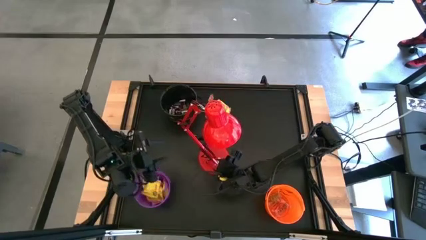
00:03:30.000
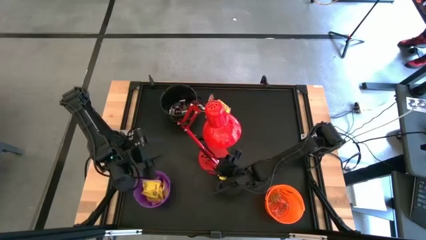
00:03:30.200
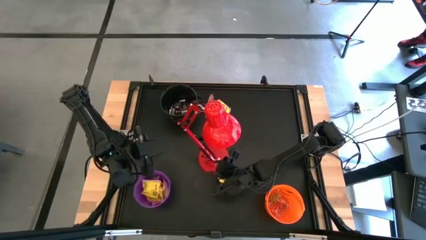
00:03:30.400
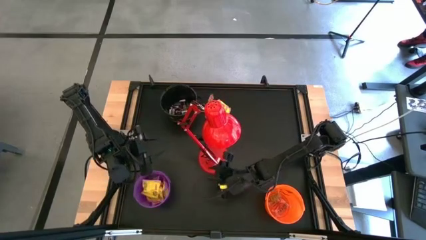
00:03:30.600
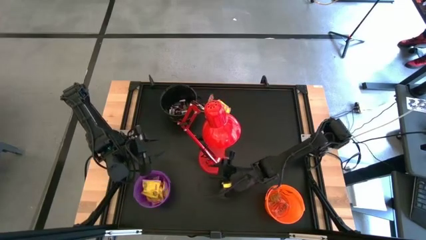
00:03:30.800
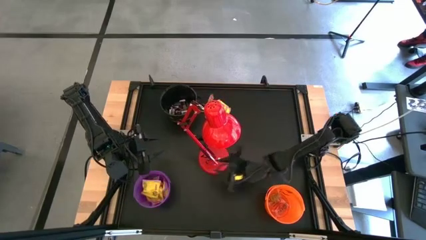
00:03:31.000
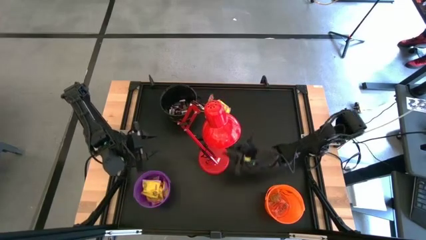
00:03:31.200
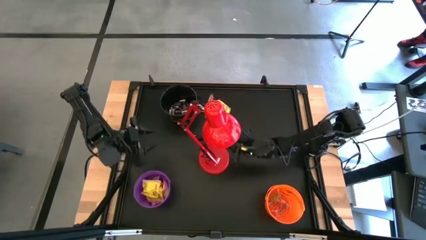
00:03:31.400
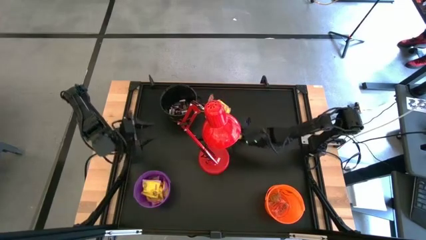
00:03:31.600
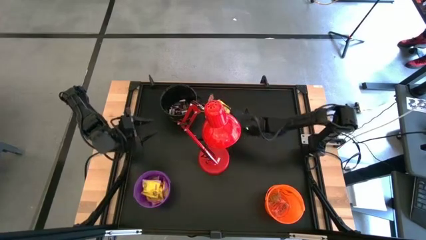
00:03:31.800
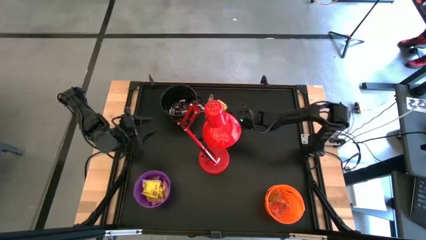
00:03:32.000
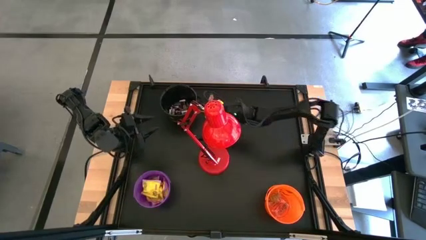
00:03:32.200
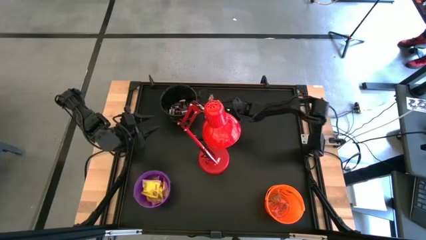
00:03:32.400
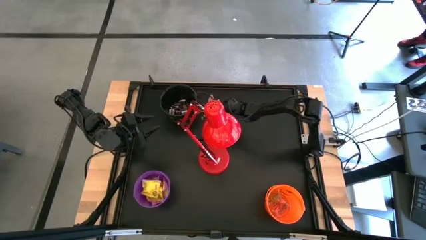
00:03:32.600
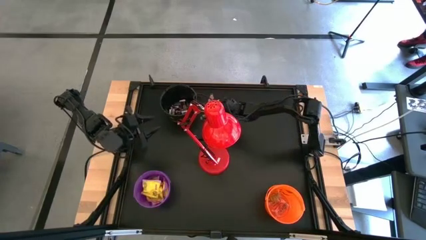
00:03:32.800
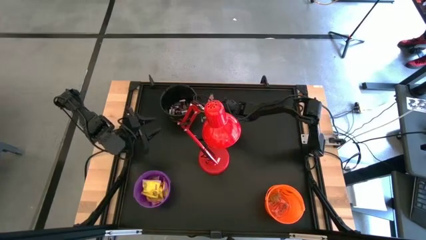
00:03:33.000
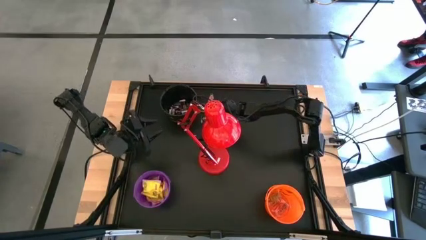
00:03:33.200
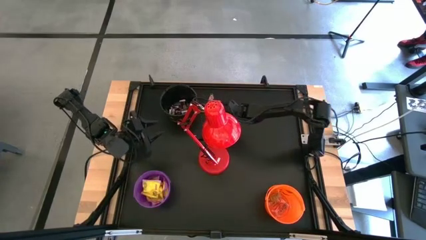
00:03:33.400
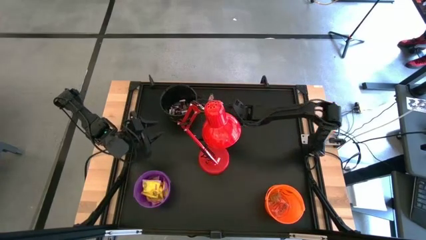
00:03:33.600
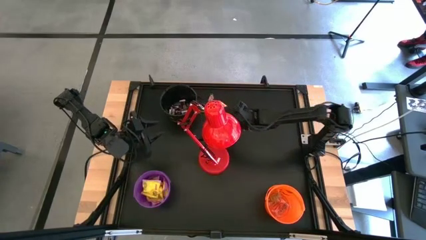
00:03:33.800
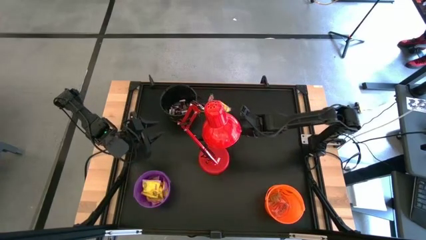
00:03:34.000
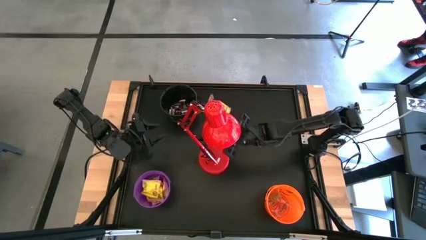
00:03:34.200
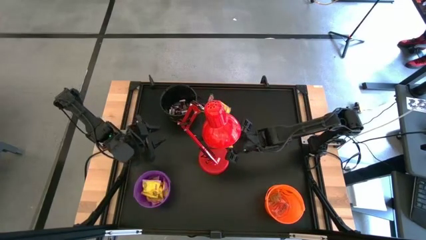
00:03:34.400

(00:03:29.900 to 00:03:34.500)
Task: Organize candy in baskets
Put the brown chocolate bar into the black bucket

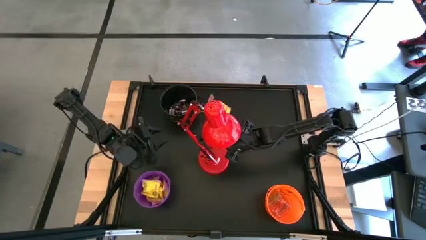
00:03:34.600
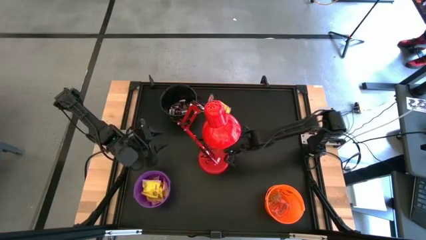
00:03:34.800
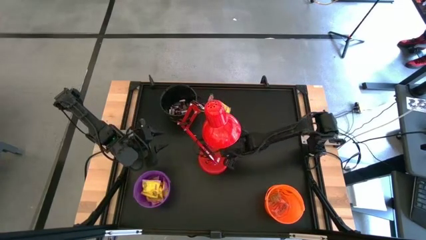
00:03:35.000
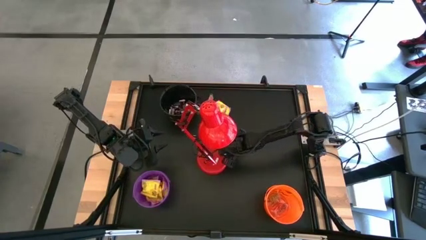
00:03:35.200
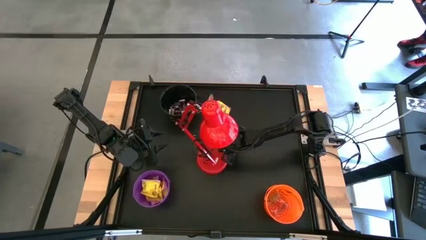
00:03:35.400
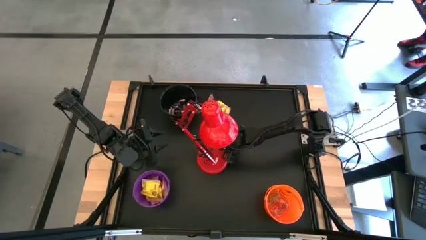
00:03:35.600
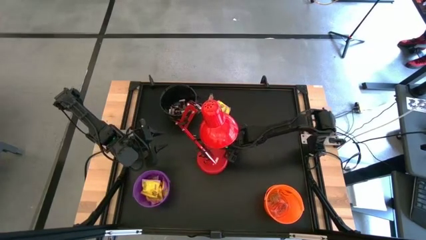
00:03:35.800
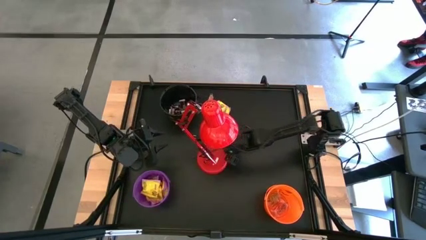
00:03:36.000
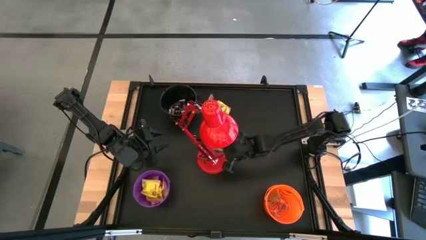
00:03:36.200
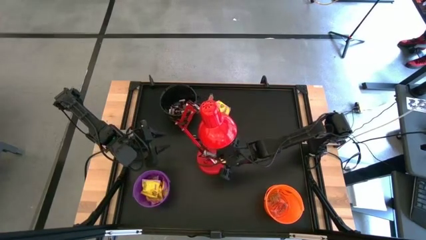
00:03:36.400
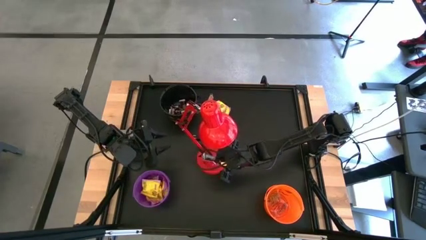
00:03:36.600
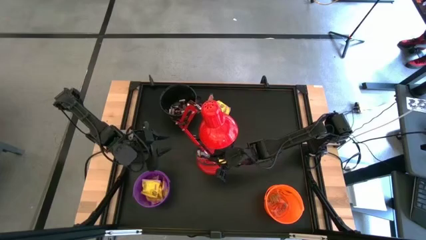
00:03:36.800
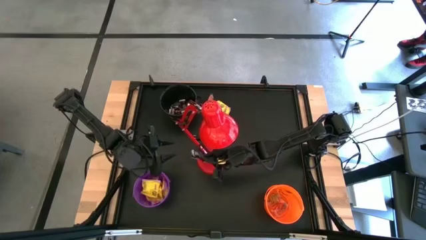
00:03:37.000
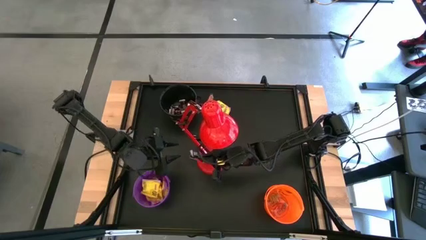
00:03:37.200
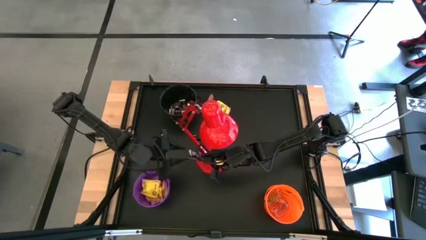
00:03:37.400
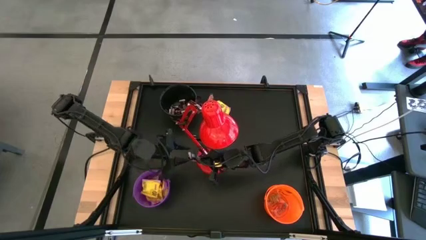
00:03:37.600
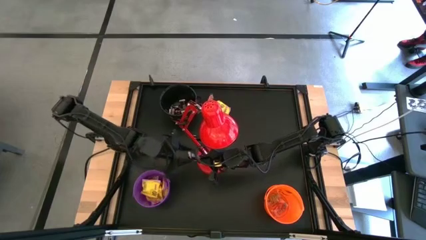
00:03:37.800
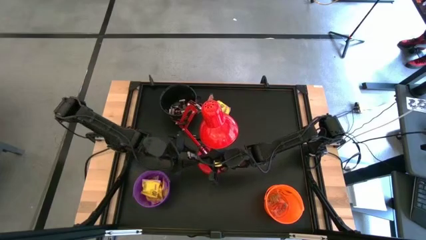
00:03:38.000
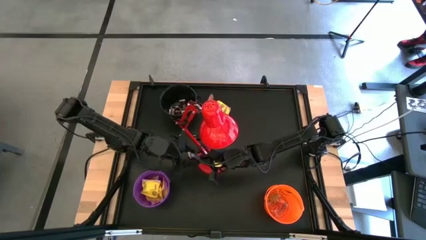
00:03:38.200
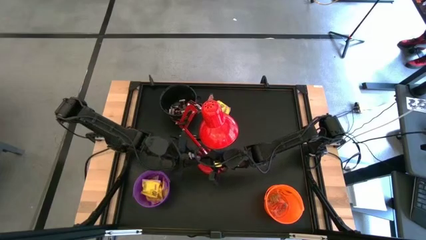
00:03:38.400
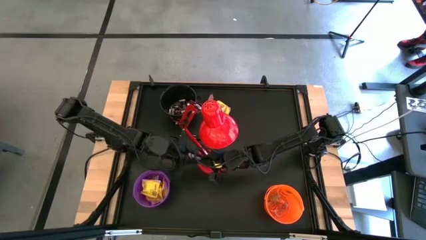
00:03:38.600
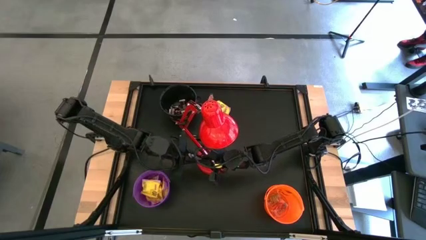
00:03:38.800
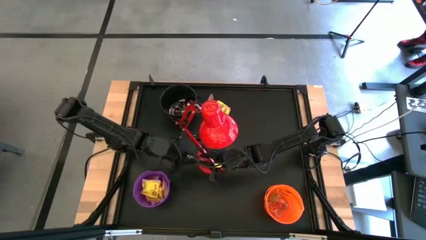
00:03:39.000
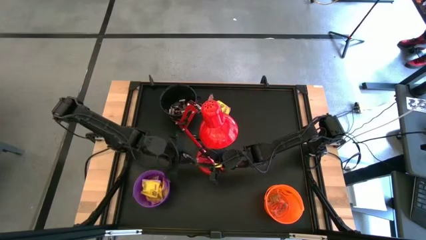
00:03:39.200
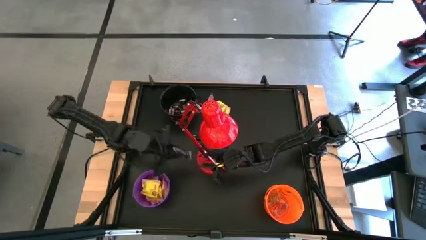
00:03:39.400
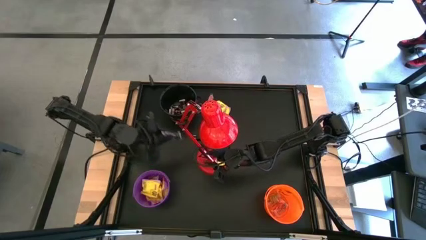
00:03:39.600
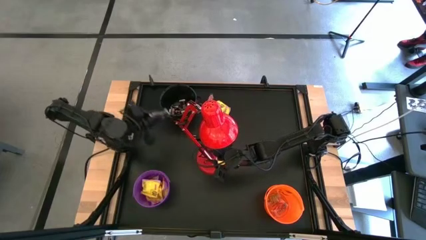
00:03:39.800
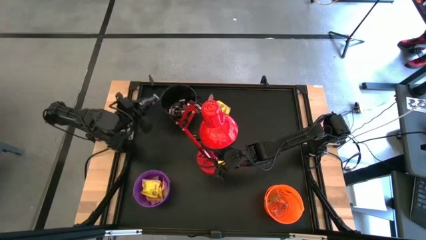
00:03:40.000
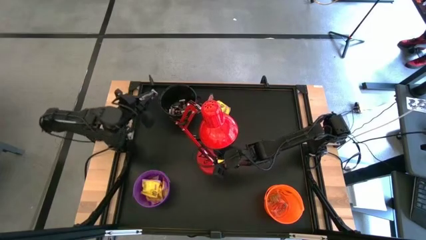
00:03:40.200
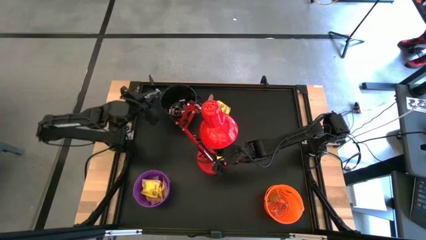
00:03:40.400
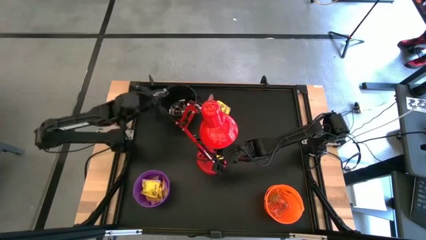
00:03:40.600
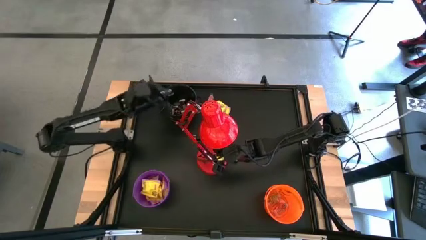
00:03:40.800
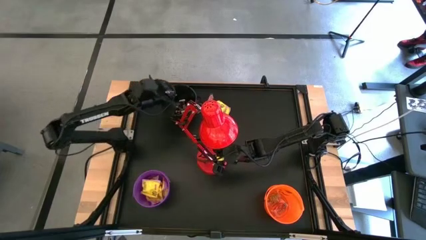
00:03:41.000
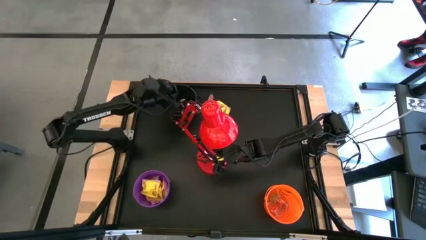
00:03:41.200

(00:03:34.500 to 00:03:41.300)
Put the brown chocolate bar into the black bucket
